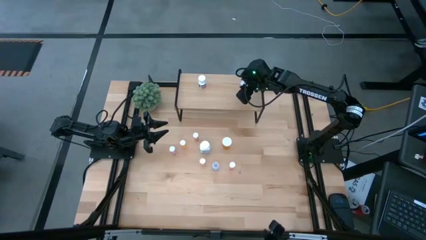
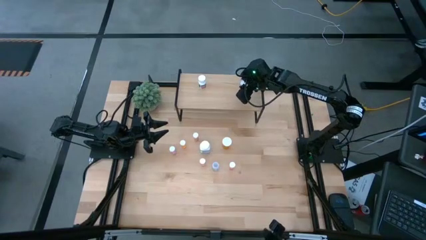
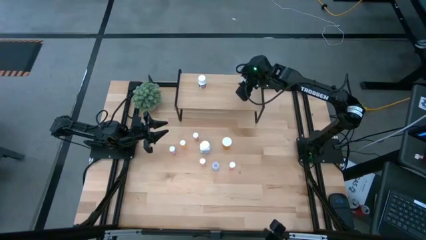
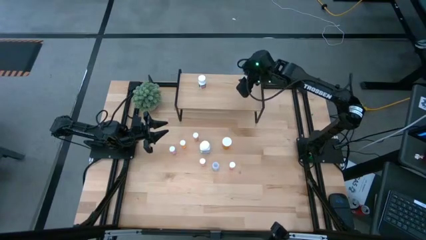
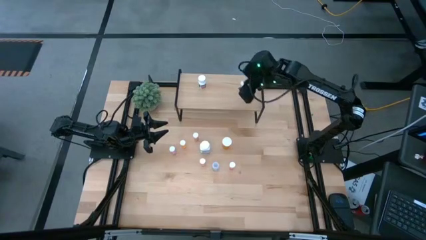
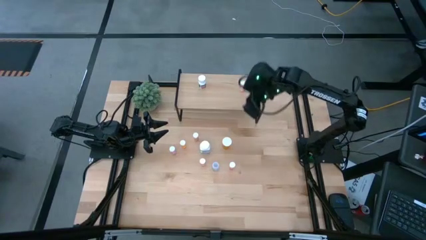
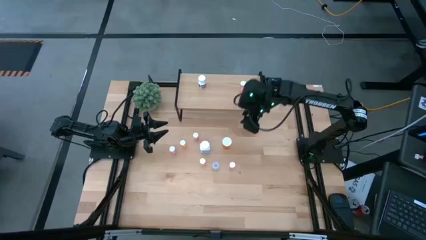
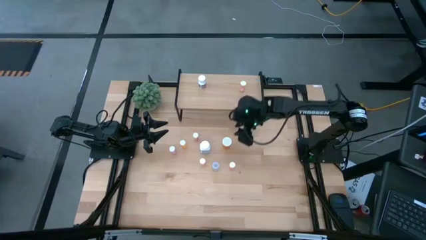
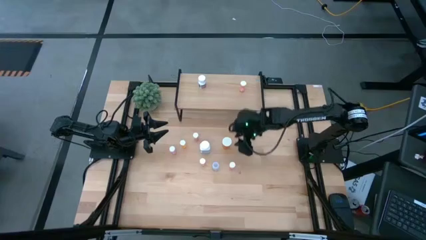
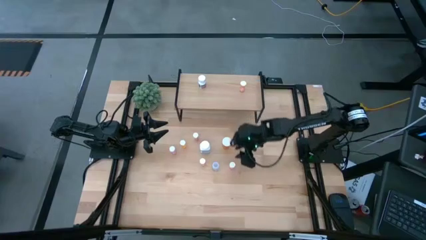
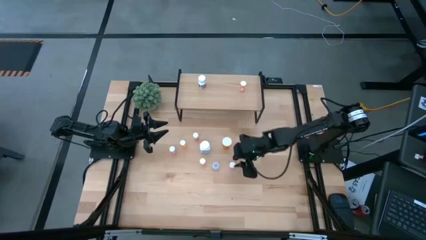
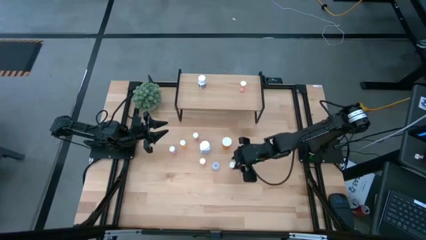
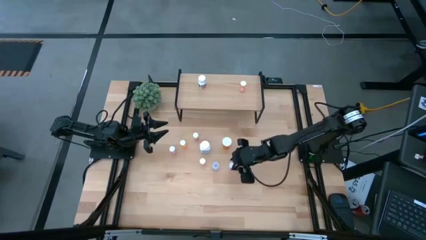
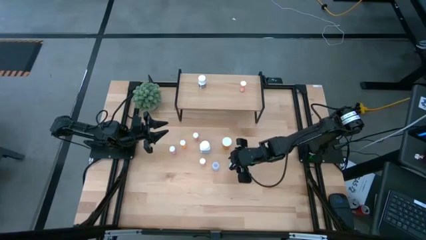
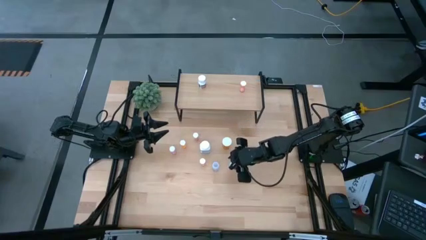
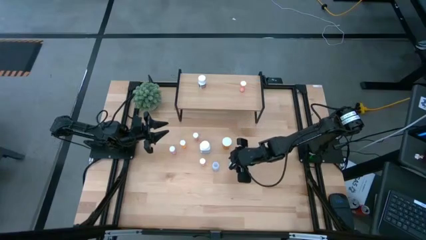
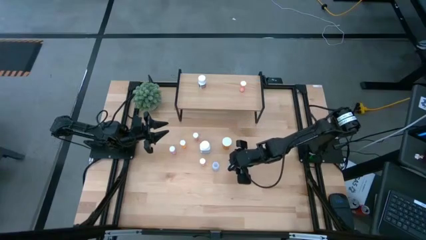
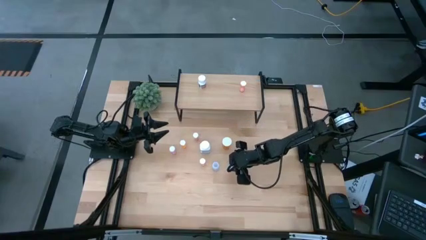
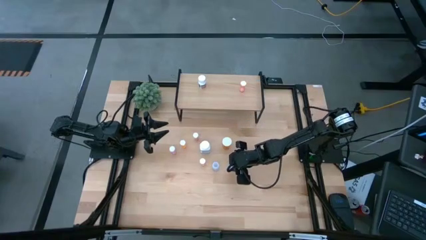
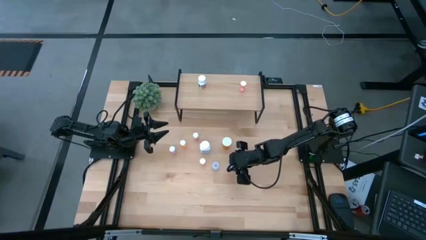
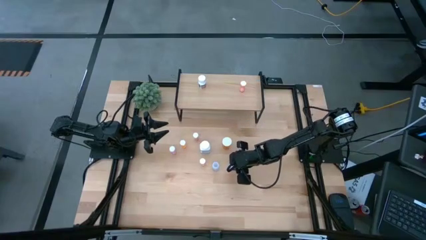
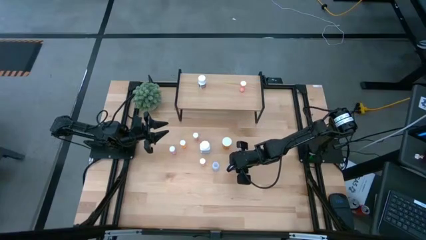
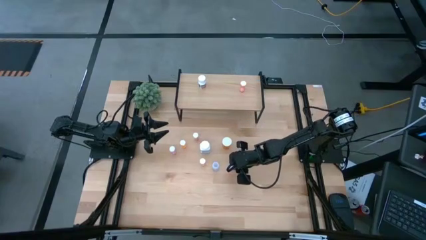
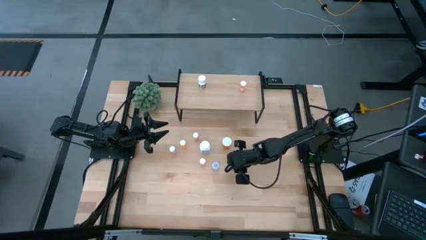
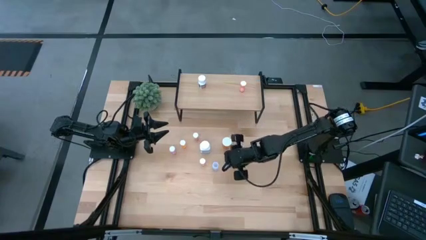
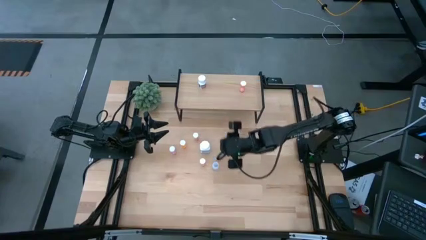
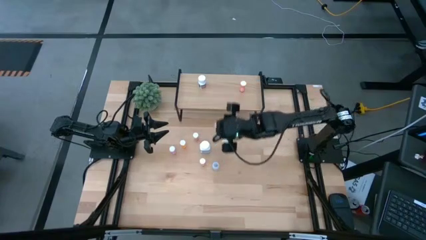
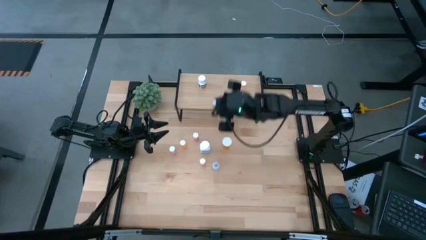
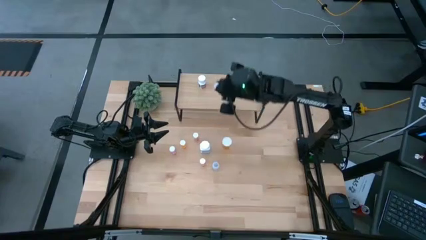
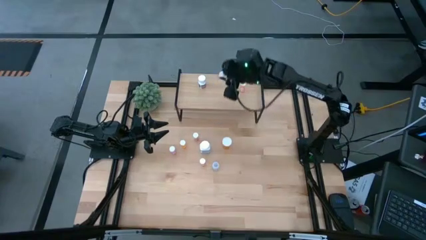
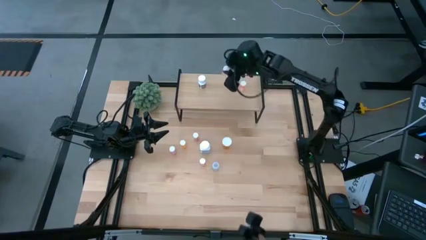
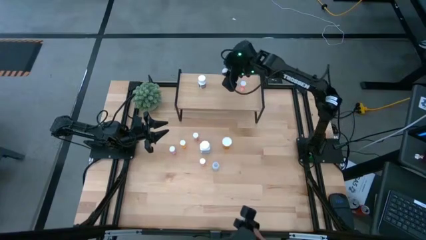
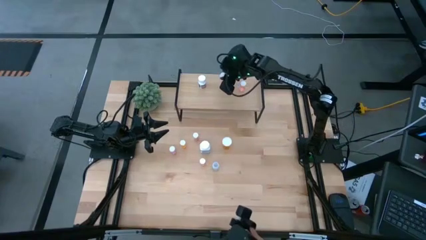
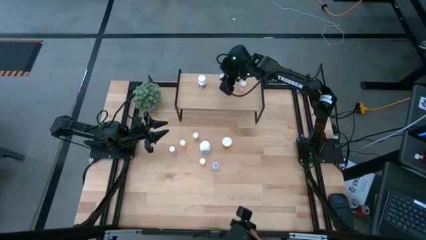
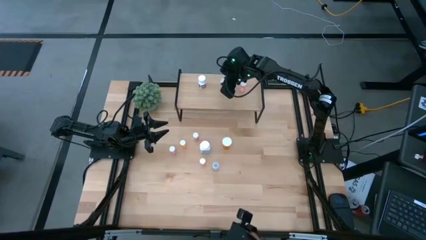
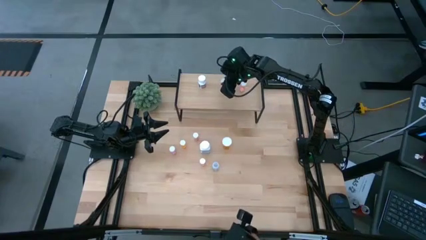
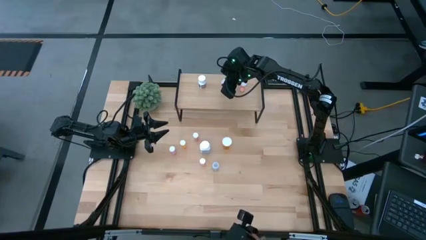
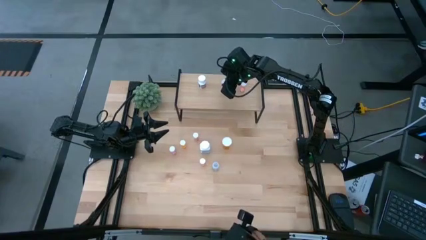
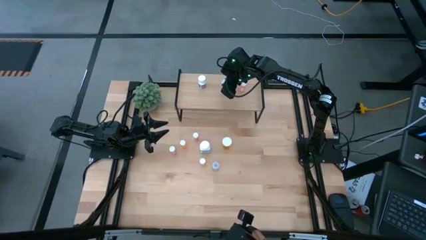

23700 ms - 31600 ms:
Task: Pick and place medicine bottles onto shelf by color
Put the pink pill bottle on the shelf

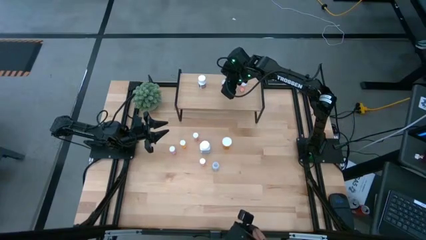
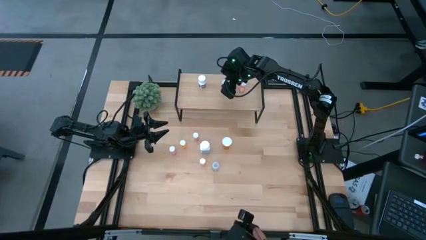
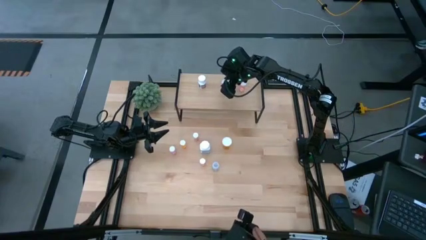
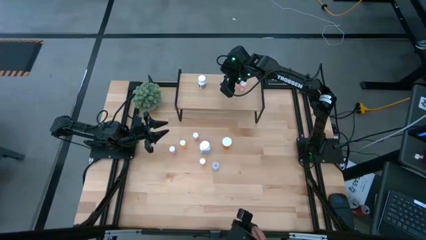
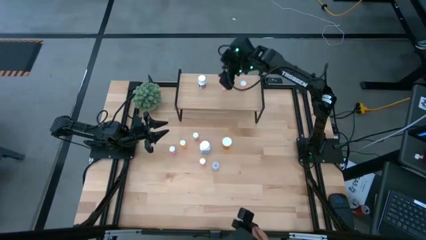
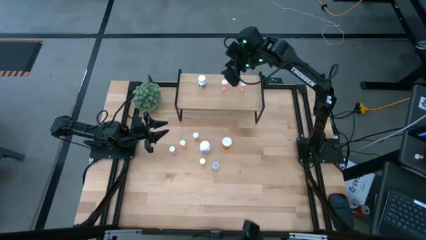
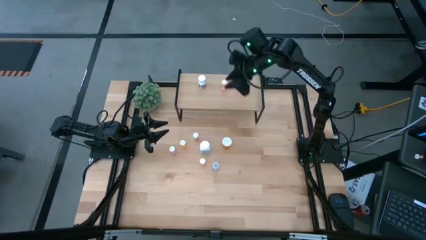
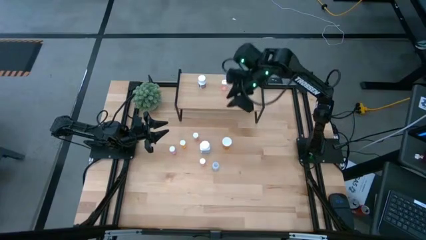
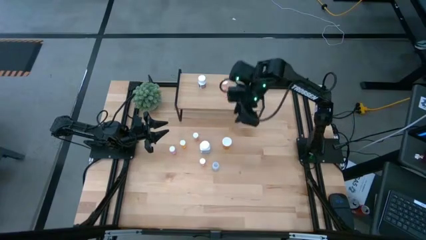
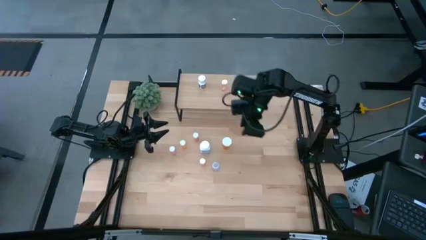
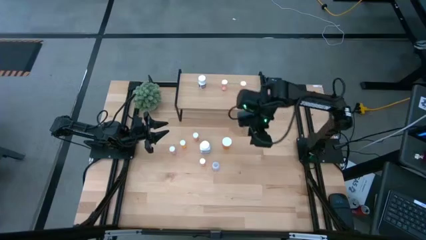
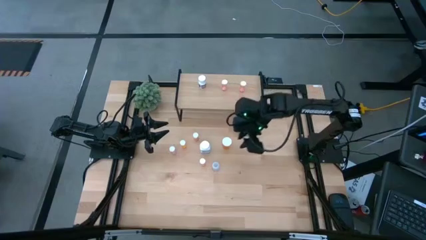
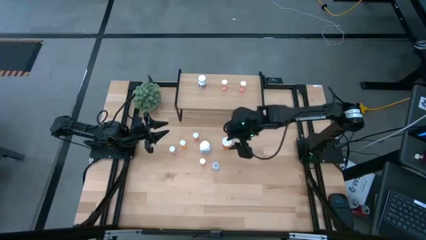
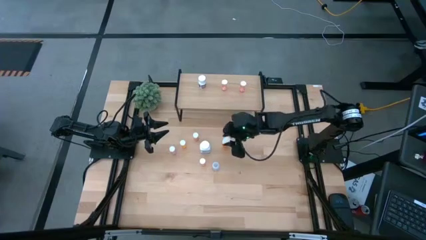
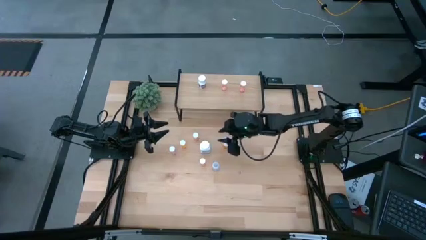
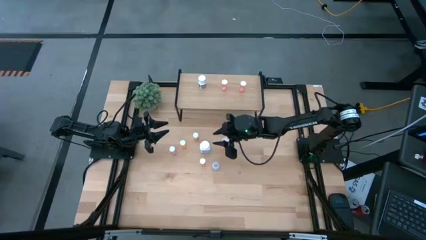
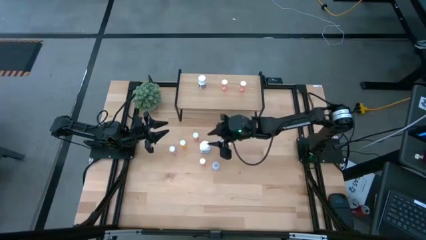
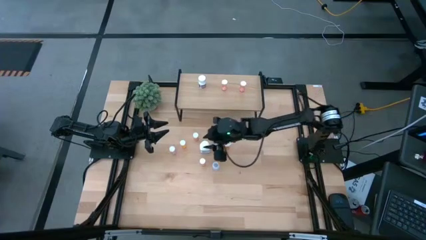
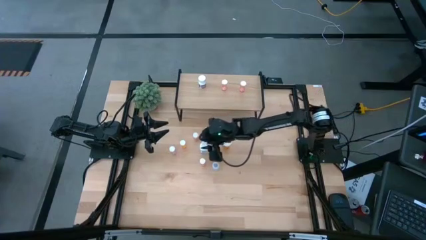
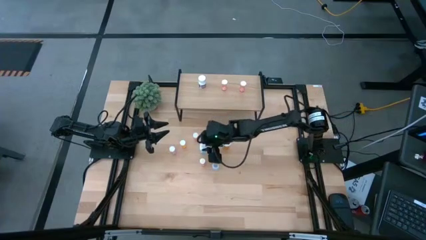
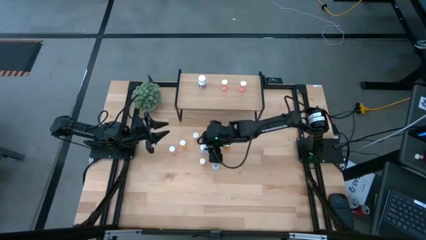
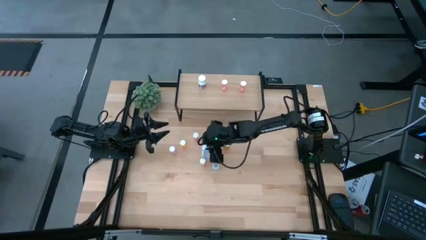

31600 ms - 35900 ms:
Put the white and blue medicine bottle on the shelf

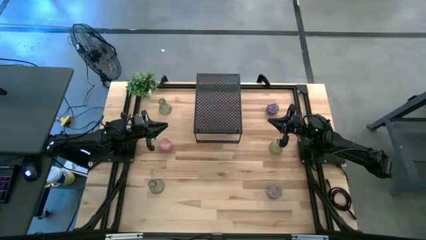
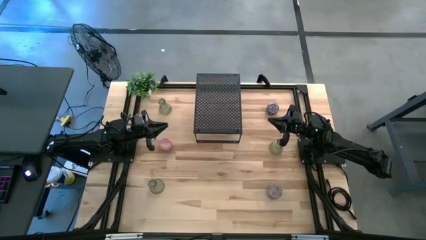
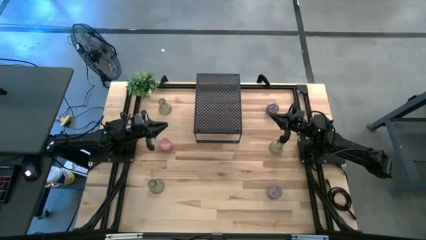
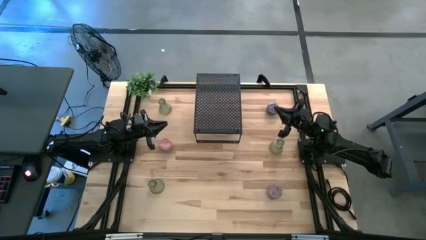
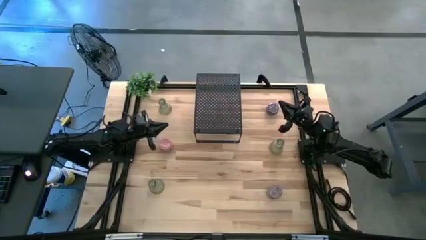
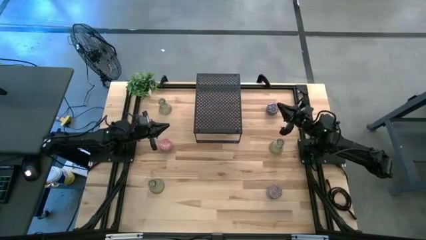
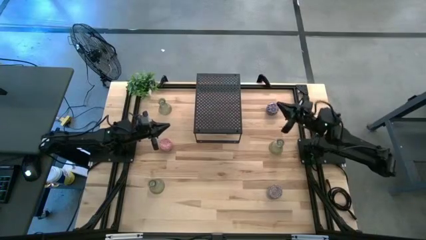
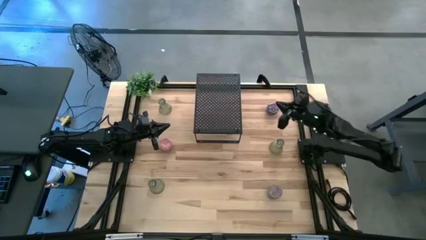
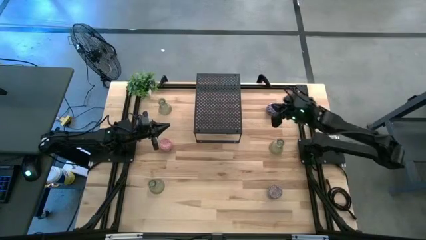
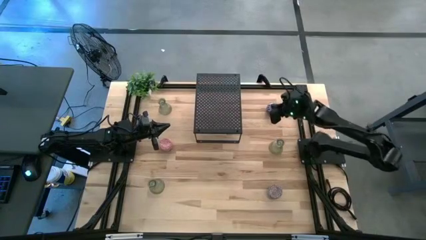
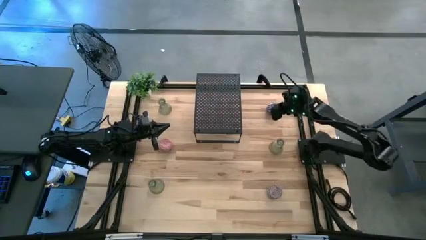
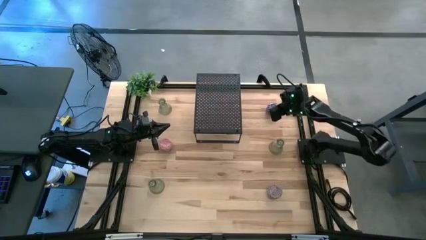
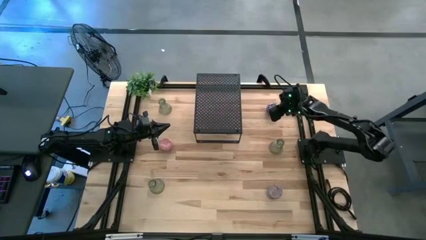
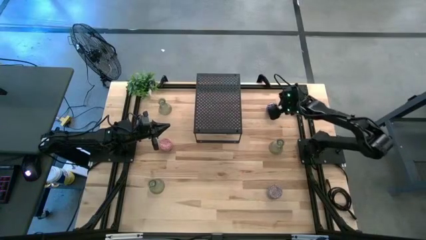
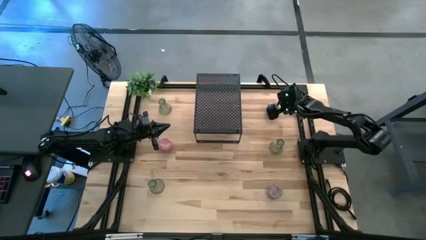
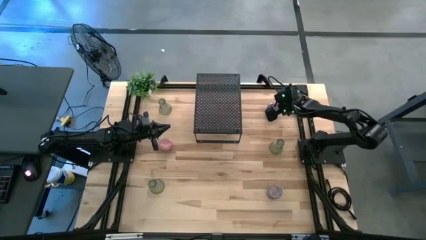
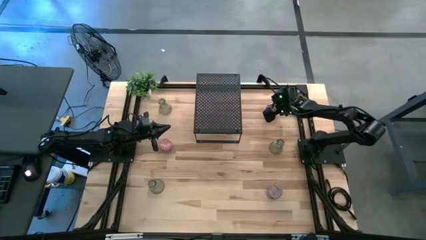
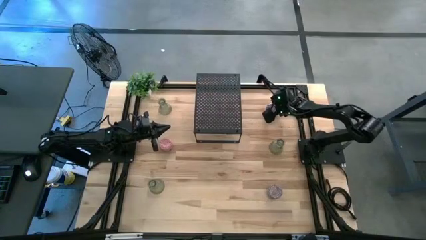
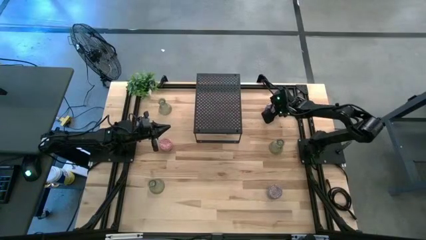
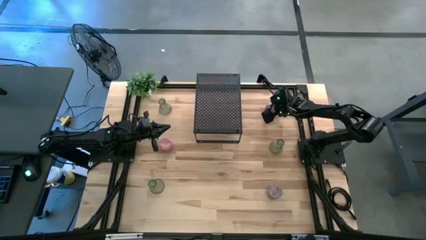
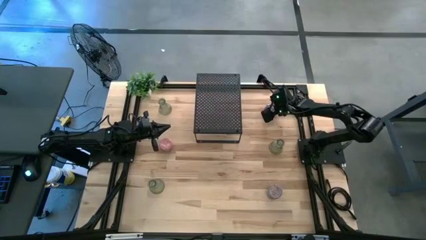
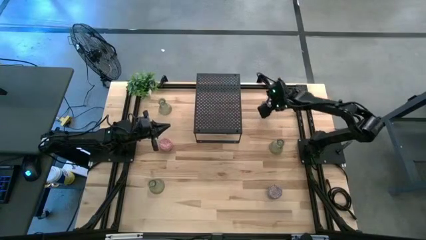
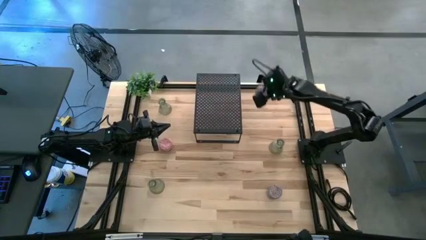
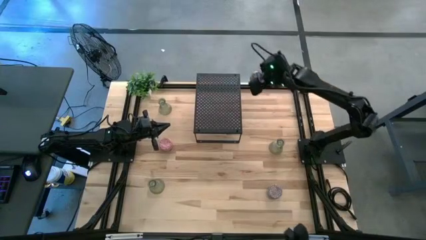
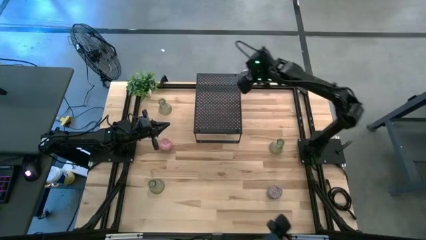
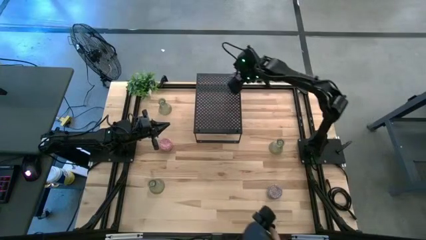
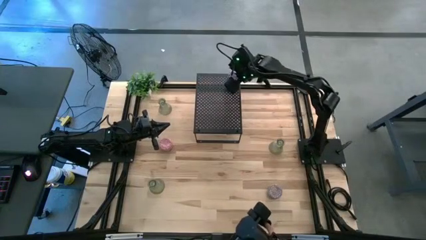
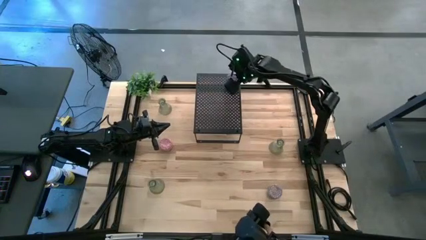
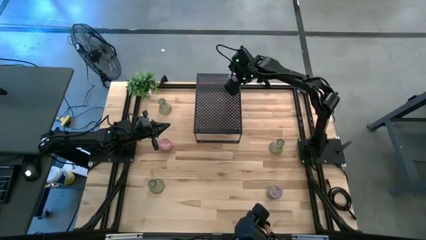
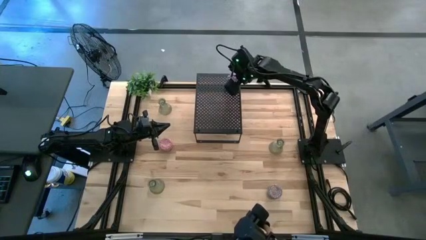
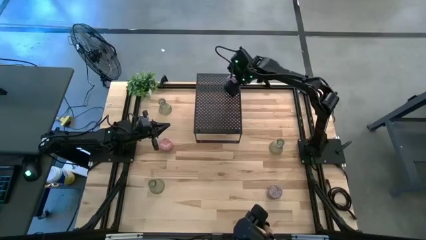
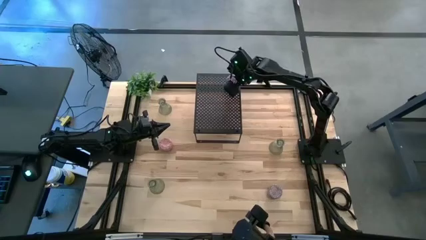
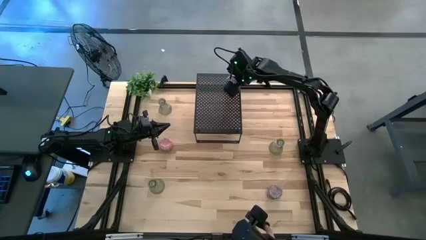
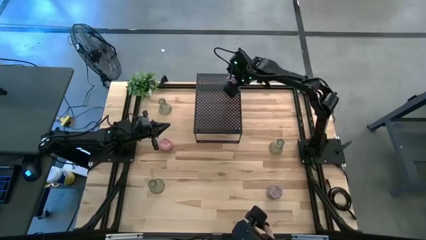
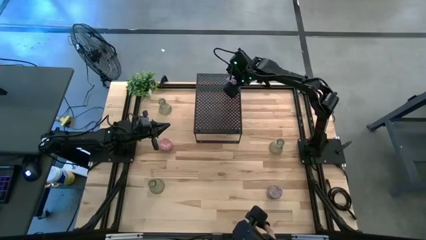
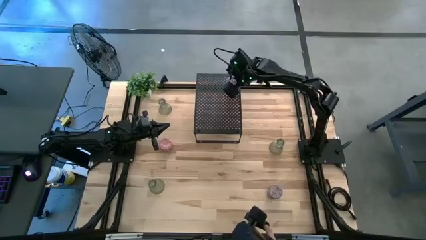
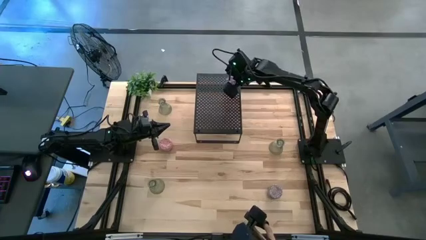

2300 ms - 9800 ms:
Task: Stock candles and vases on shelf
Put the black patterned scented candle on the shelf
